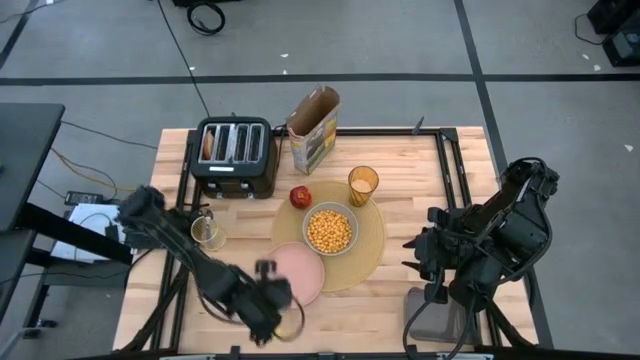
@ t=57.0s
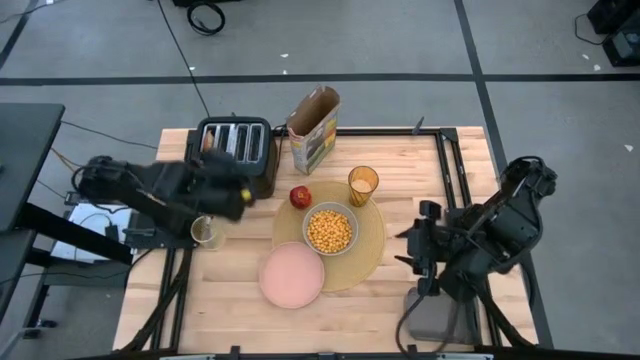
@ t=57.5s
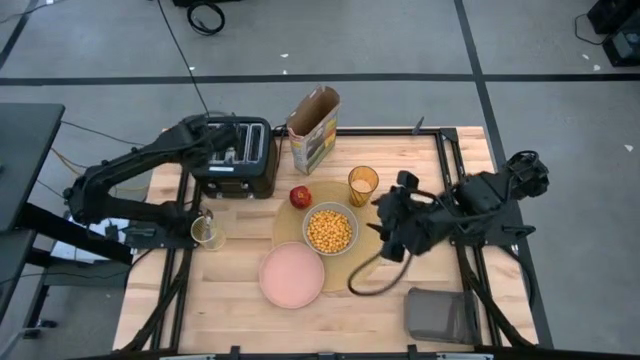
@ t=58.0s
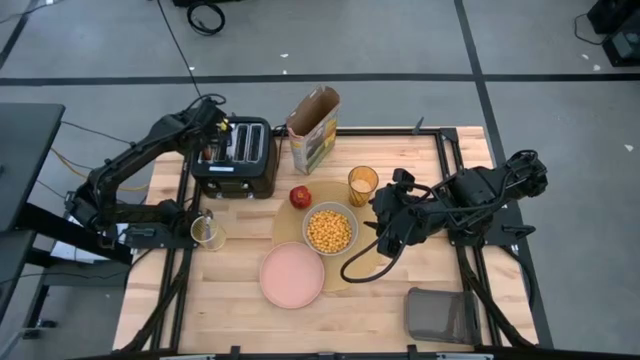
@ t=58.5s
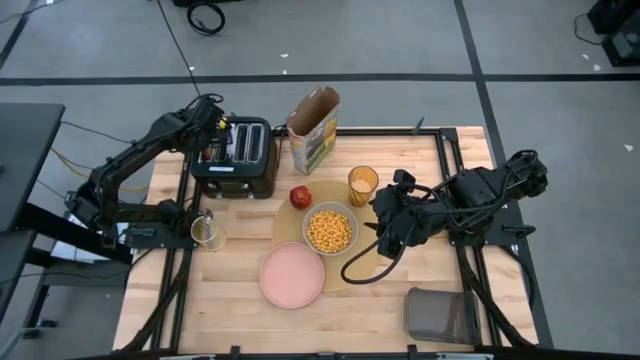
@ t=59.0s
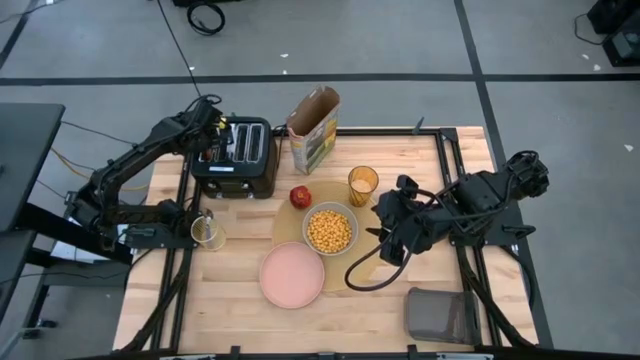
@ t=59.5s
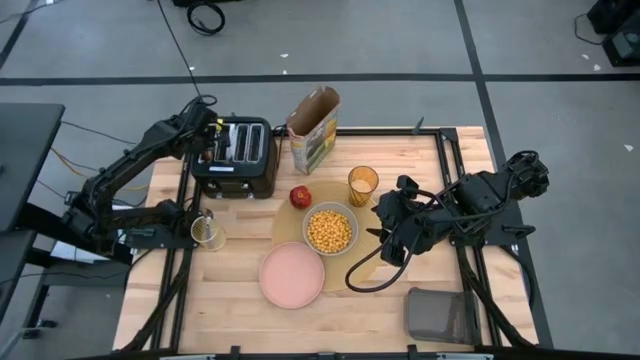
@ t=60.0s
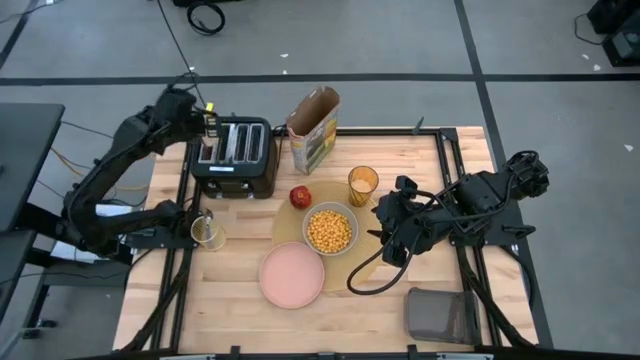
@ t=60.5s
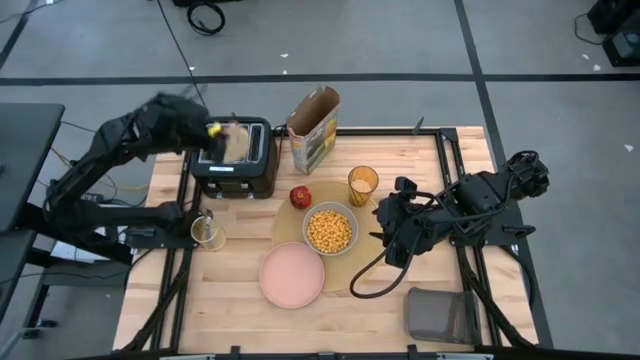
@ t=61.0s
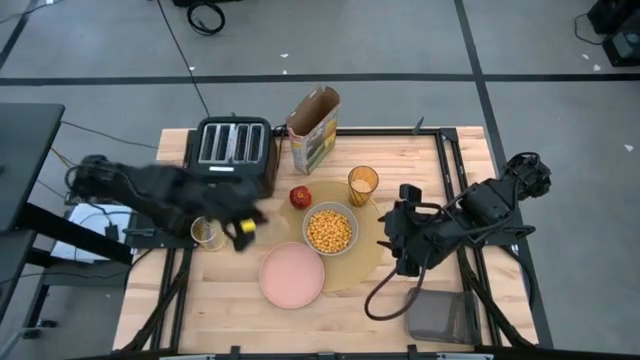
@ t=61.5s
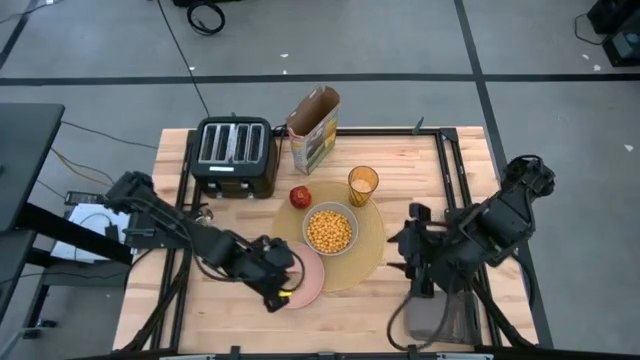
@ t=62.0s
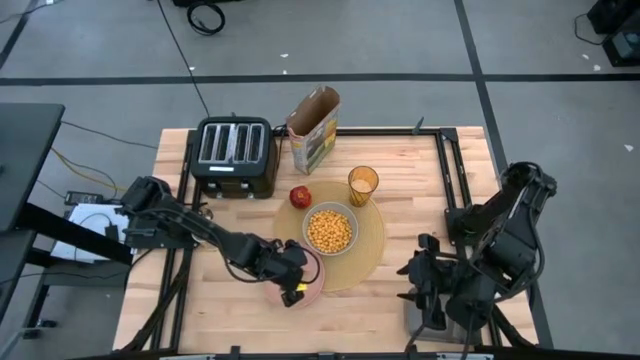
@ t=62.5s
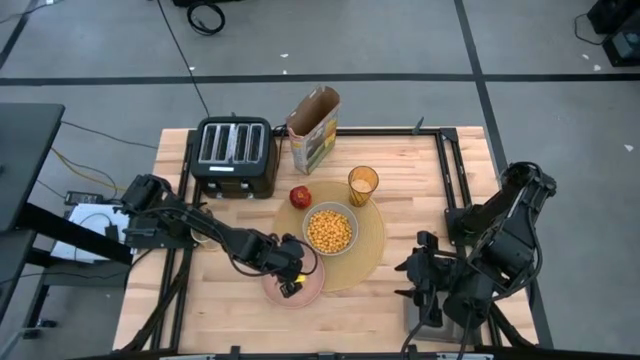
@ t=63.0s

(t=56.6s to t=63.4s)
Task: Arrange a breakfast setting
Put the bread on the pink plate

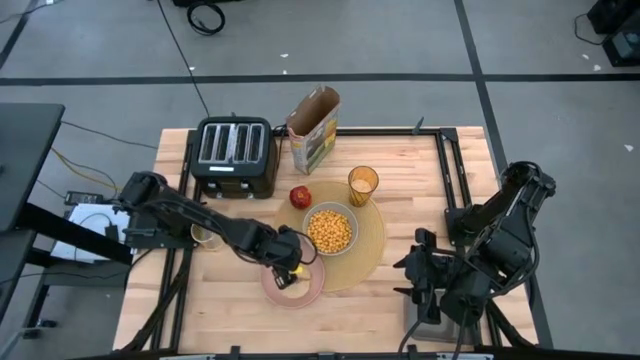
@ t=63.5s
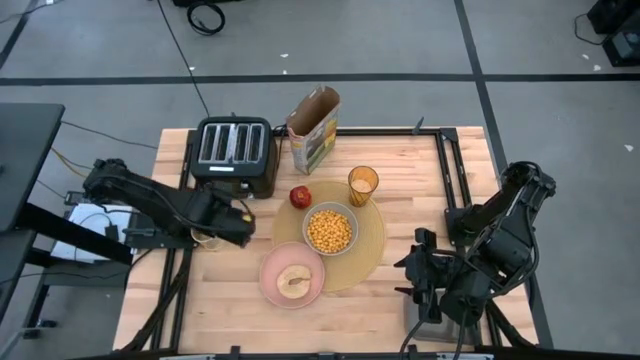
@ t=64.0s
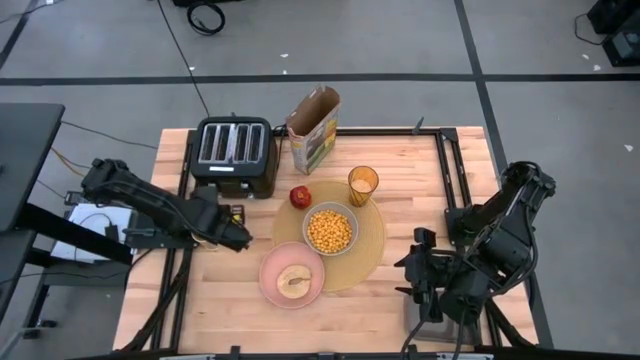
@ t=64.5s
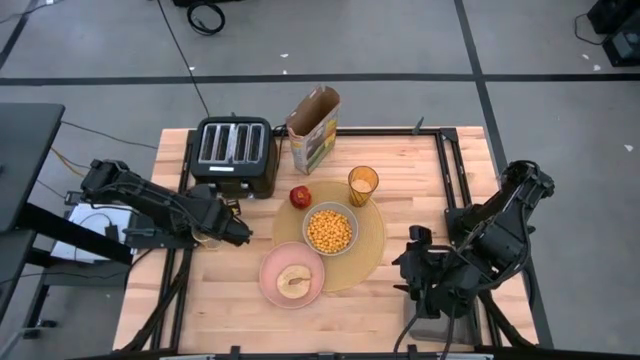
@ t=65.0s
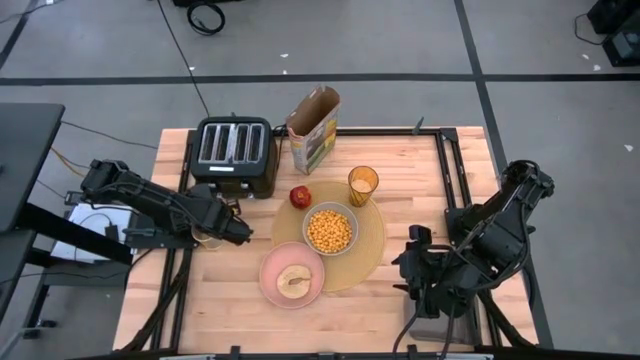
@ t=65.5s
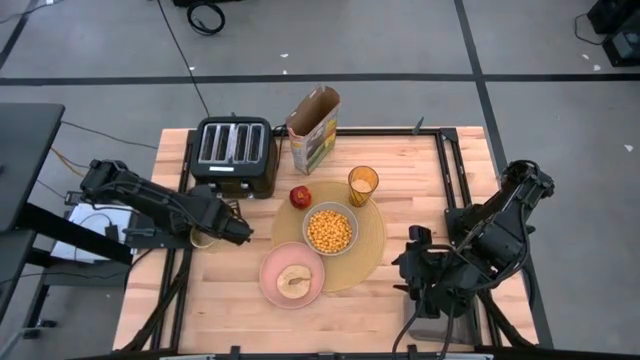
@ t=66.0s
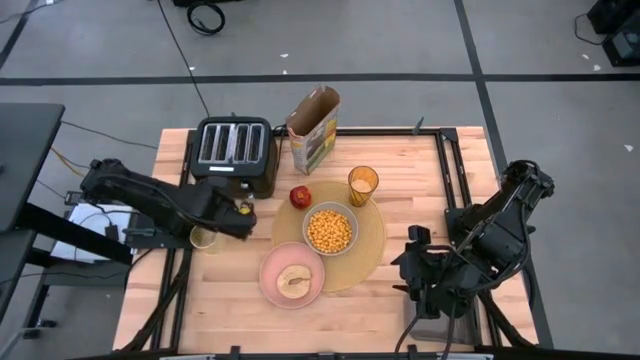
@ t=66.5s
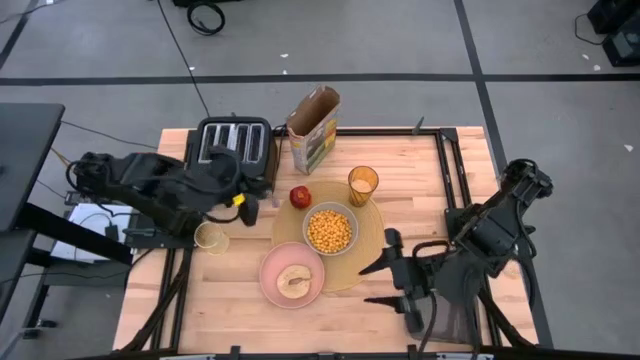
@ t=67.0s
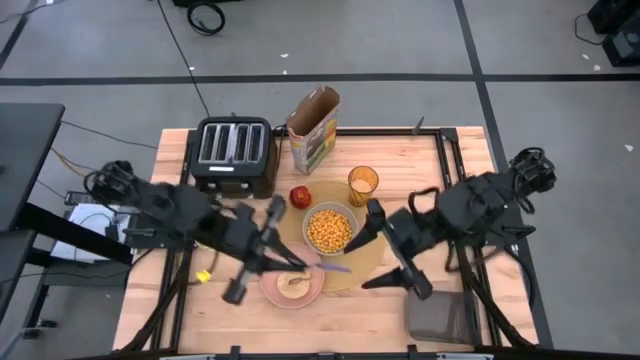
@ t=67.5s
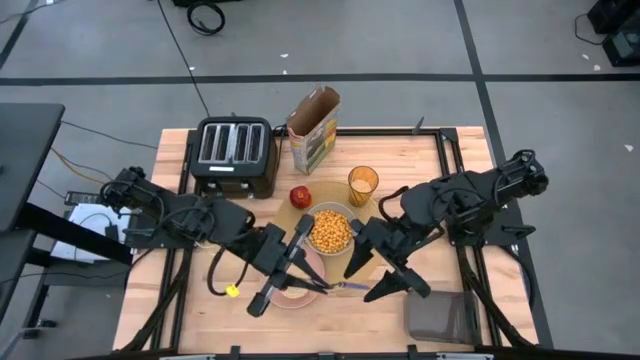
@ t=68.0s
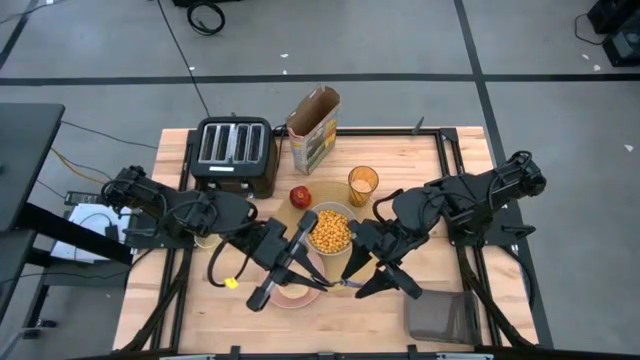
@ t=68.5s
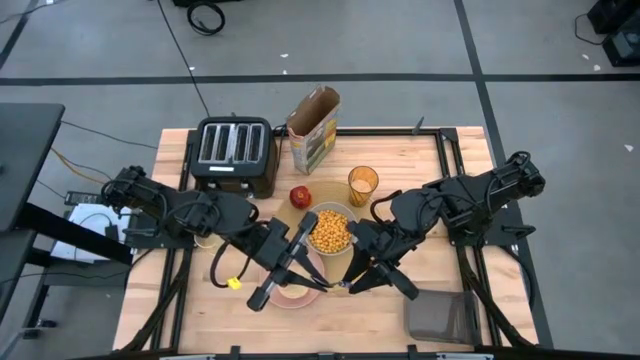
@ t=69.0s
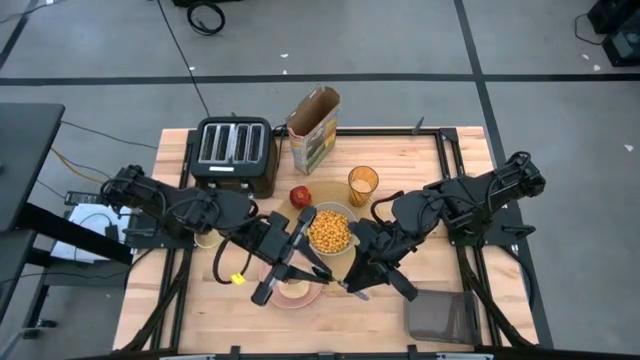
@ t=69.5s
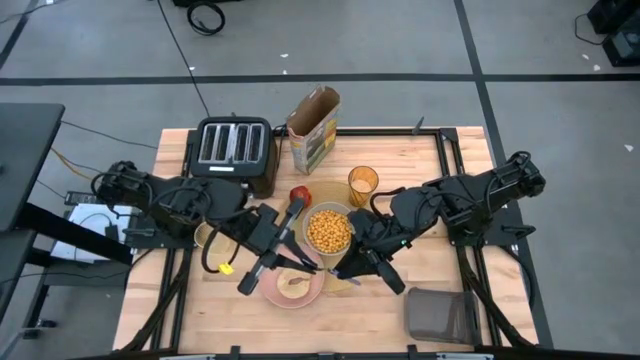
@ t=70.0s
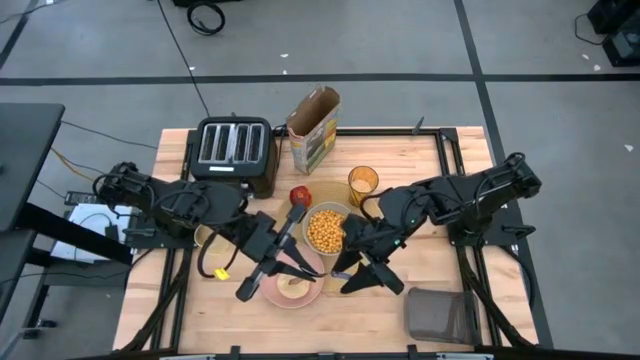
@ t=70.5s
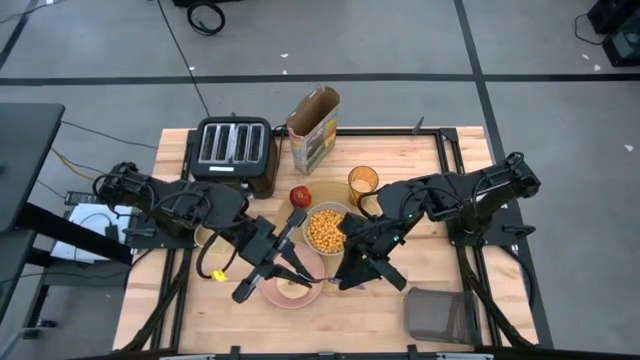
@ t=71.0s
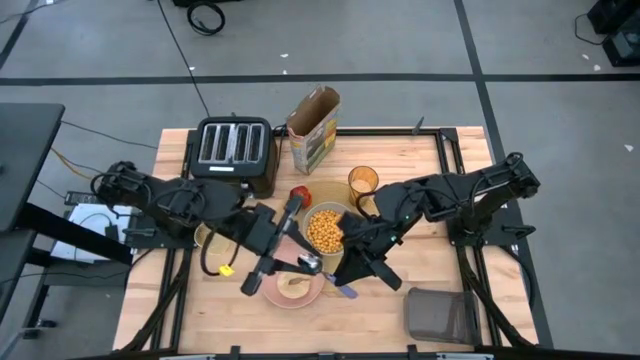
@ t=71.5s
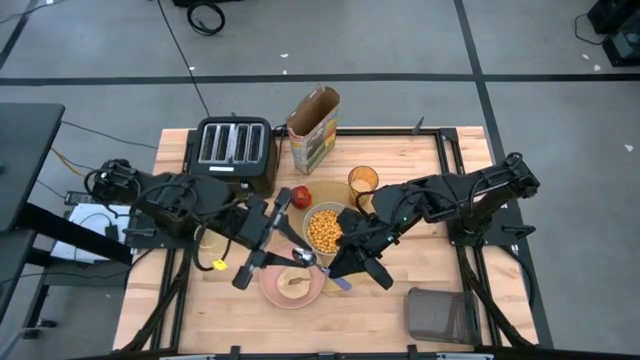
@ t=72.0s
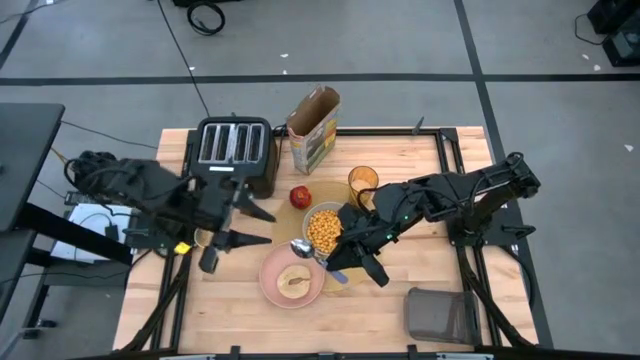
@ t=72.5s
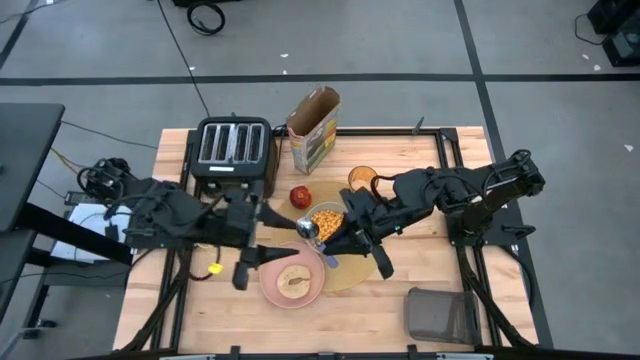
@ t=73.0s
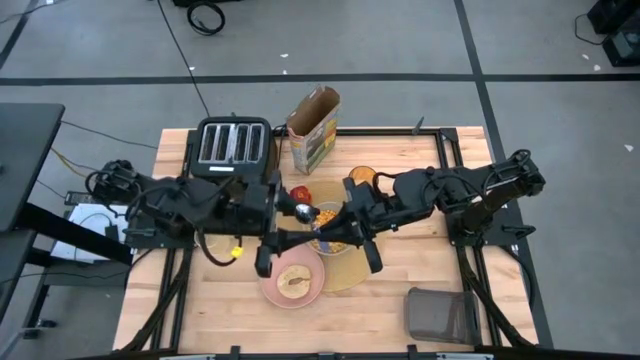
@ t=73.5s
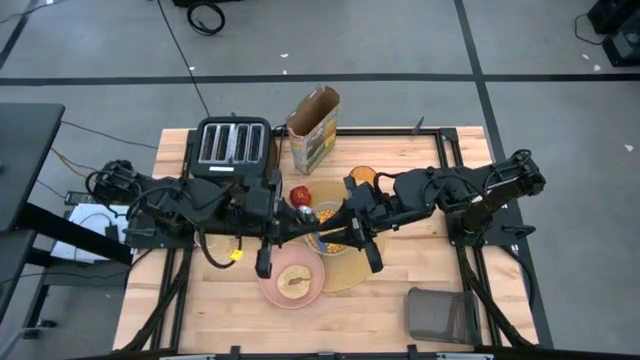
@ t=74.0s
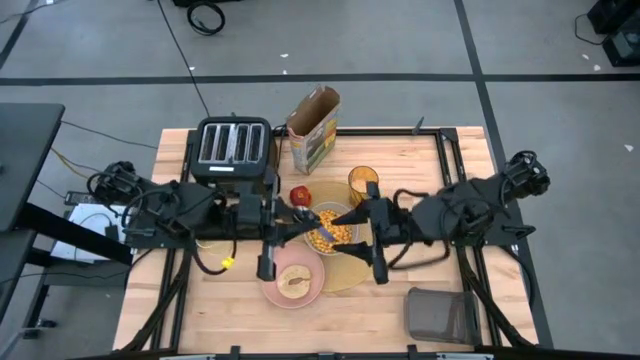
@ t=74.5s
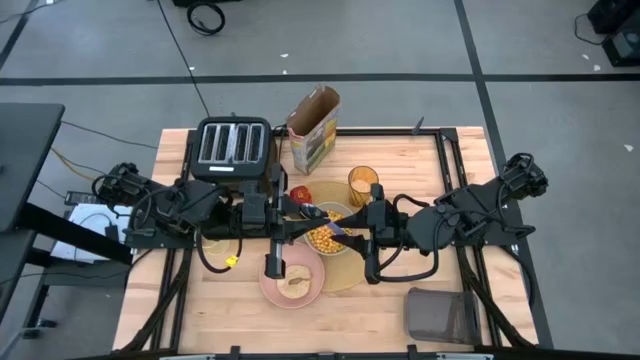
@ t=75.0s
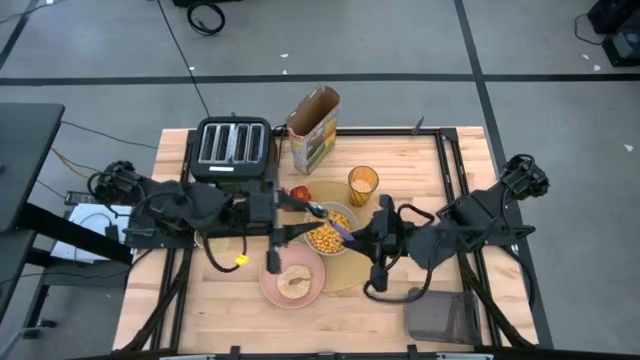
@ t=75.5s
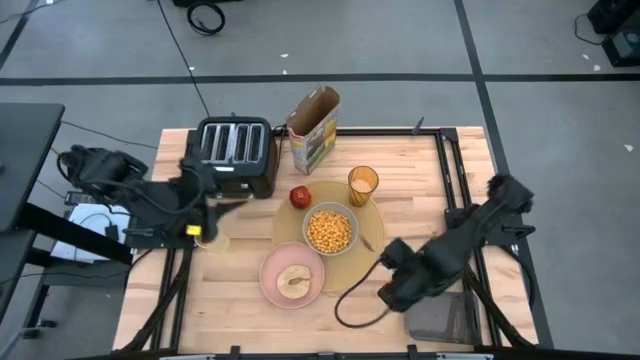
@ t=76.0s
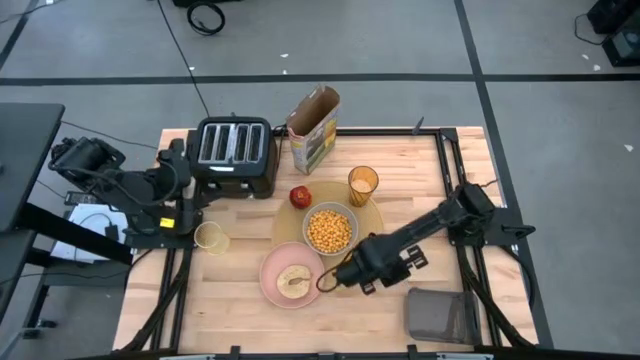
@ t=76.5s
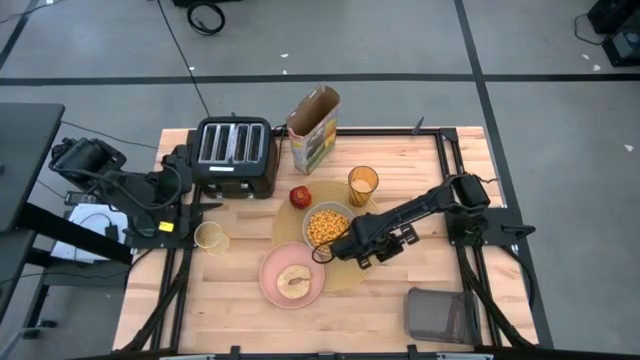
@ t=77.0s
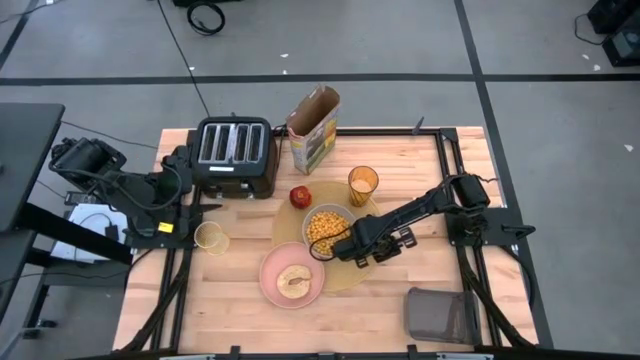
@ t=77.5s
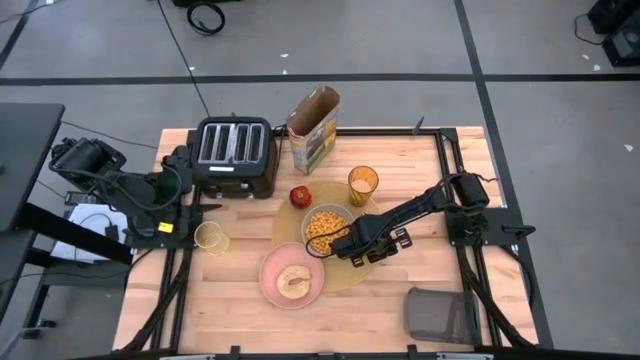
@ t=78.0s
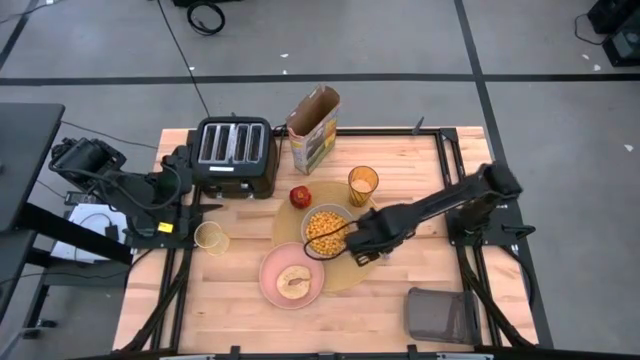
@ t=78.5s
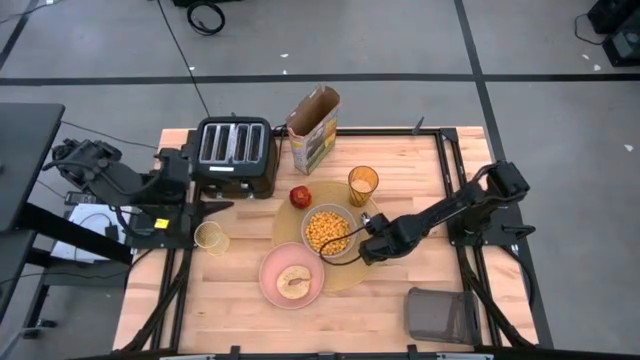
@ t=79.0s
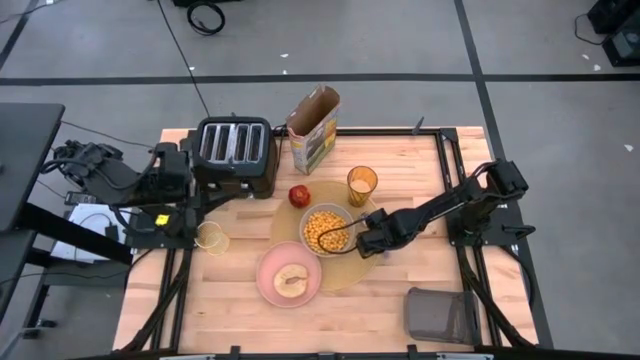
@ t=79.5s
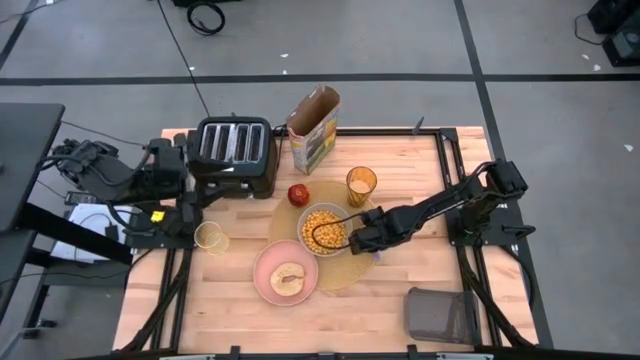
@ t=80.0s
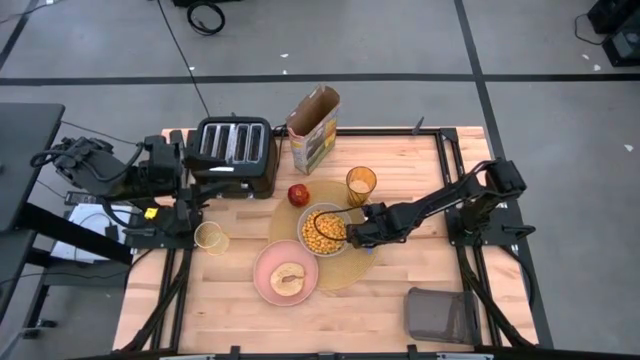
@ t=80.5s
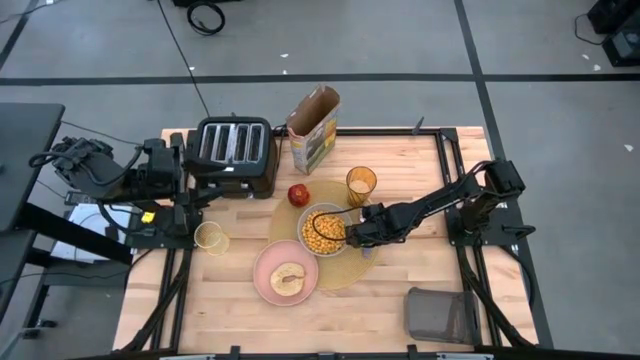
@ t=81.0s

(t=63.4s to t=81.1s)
Put the spoon on the placemat to the right of the gray bowl
